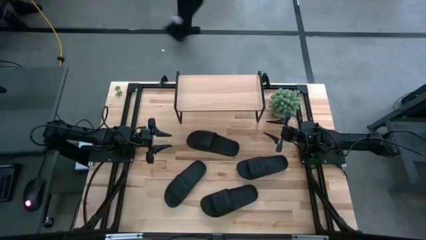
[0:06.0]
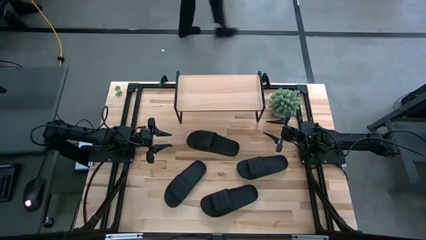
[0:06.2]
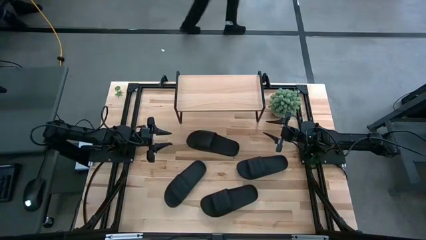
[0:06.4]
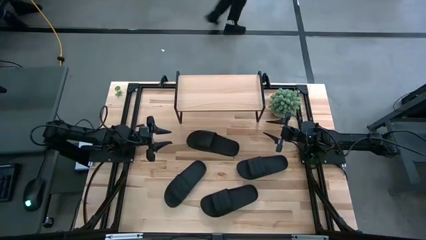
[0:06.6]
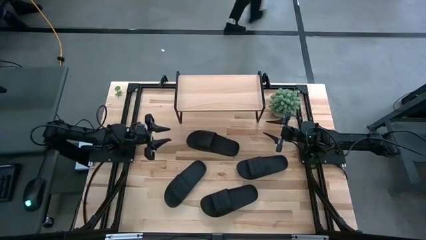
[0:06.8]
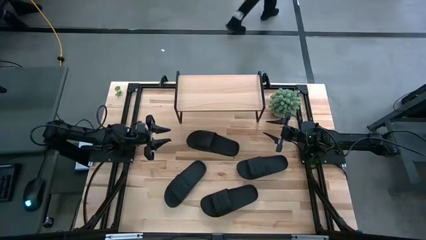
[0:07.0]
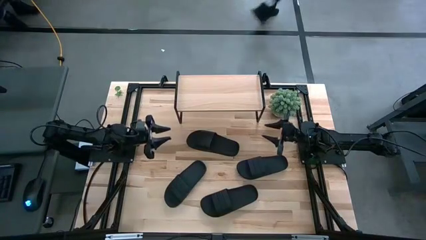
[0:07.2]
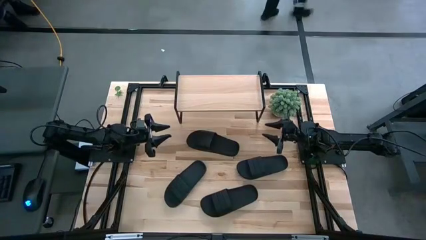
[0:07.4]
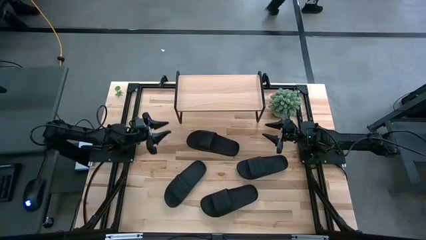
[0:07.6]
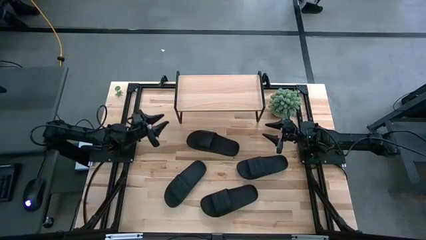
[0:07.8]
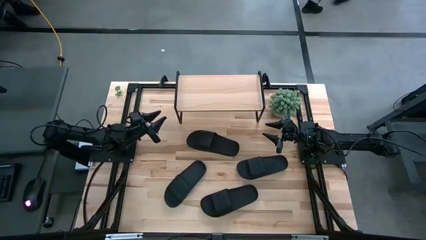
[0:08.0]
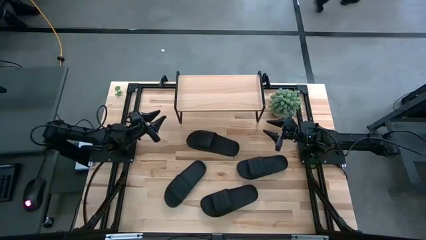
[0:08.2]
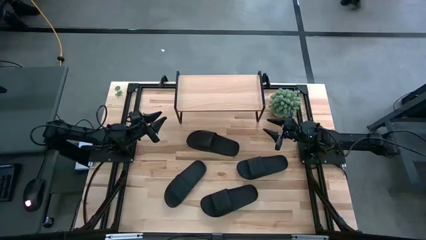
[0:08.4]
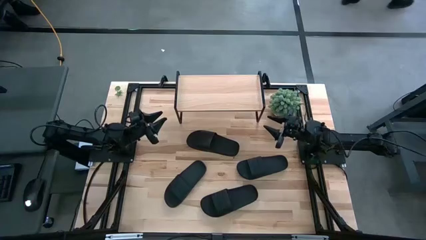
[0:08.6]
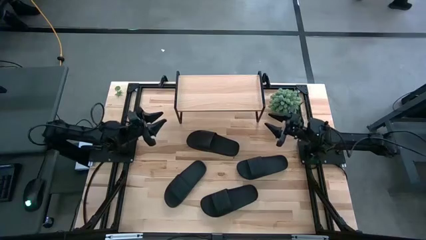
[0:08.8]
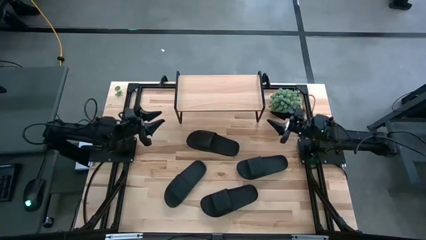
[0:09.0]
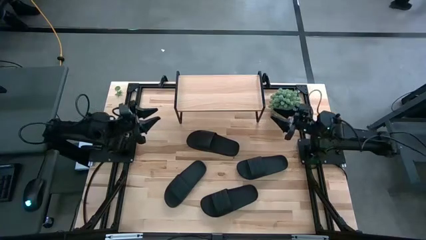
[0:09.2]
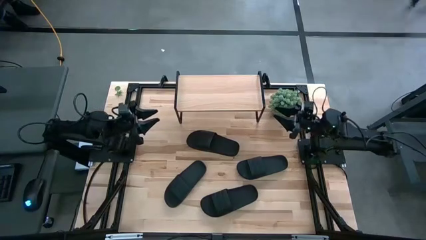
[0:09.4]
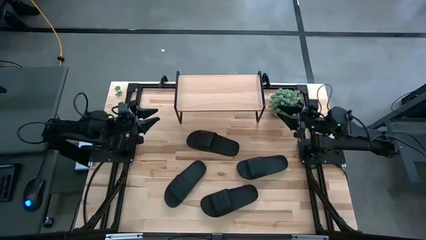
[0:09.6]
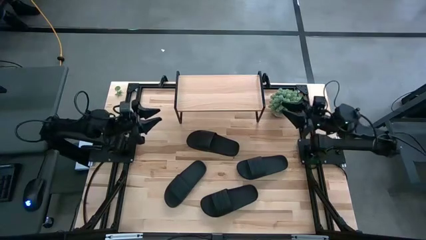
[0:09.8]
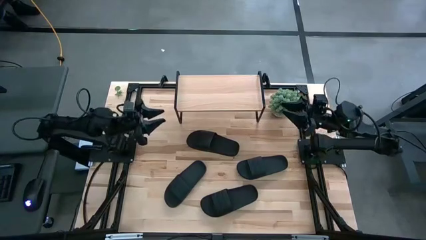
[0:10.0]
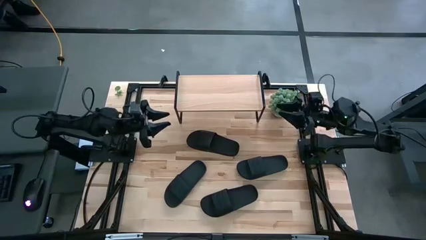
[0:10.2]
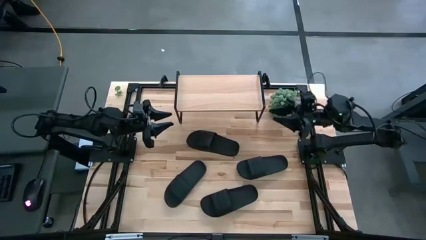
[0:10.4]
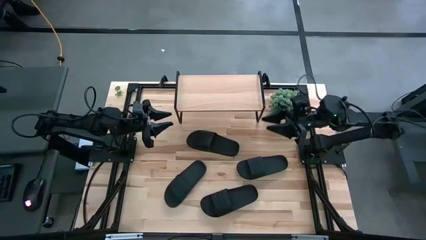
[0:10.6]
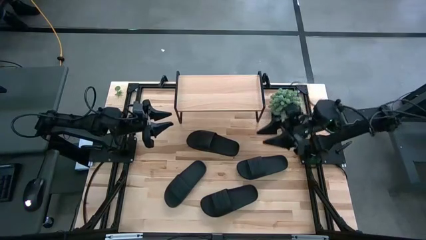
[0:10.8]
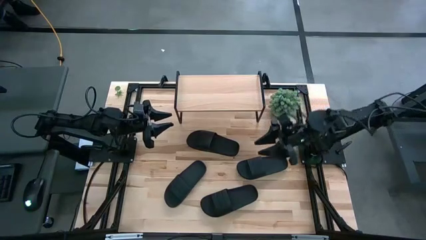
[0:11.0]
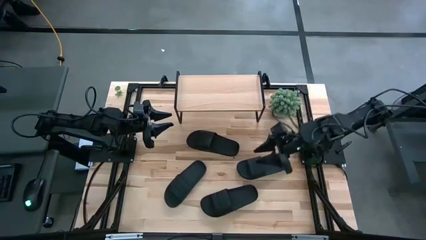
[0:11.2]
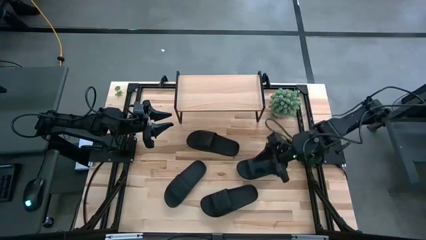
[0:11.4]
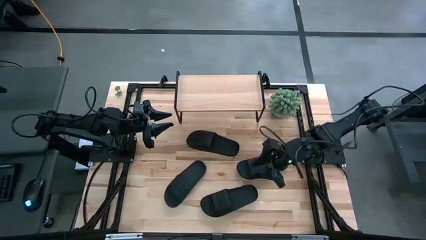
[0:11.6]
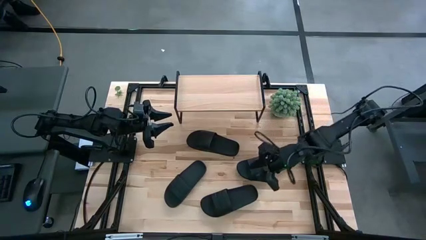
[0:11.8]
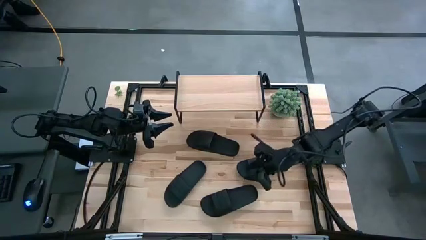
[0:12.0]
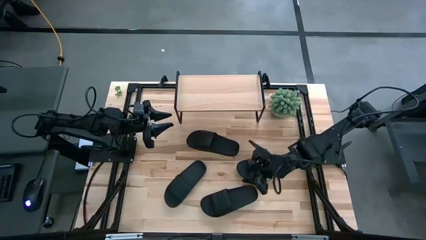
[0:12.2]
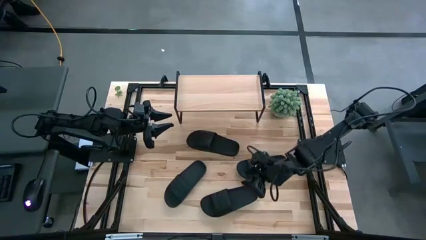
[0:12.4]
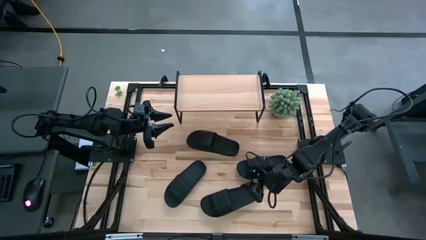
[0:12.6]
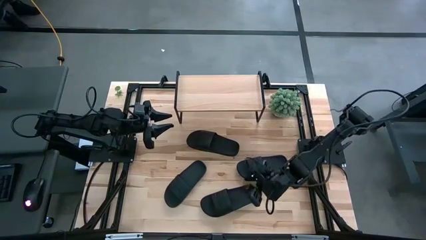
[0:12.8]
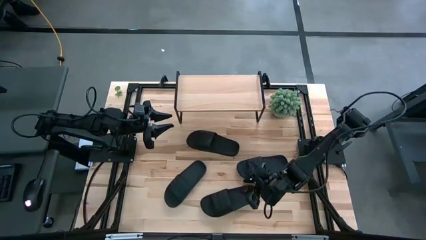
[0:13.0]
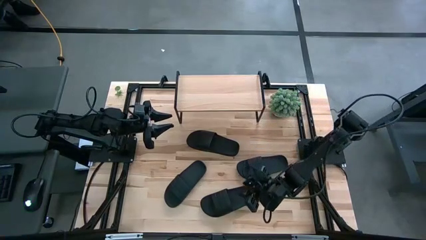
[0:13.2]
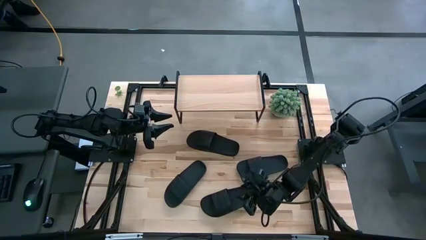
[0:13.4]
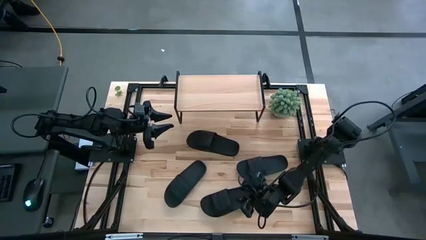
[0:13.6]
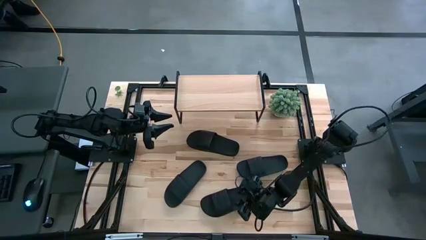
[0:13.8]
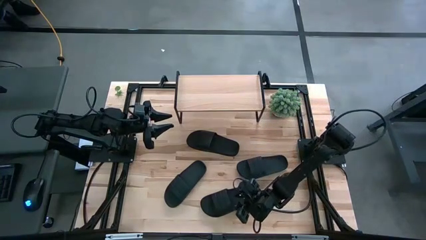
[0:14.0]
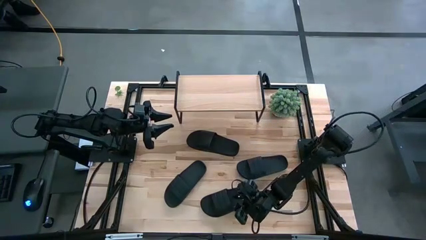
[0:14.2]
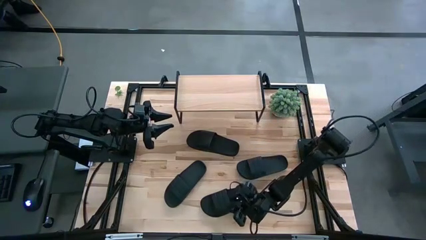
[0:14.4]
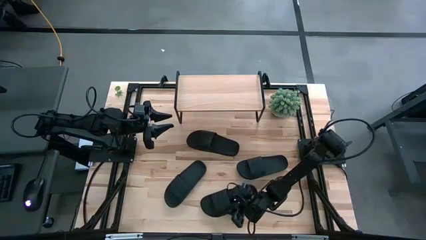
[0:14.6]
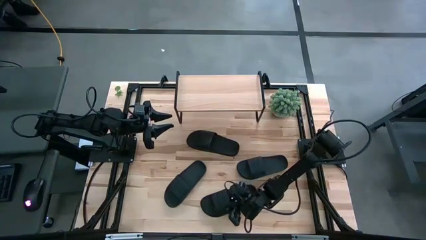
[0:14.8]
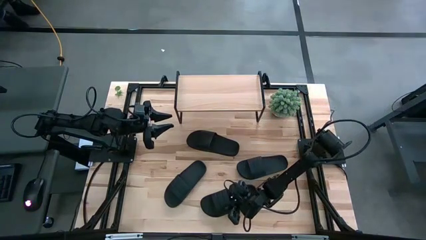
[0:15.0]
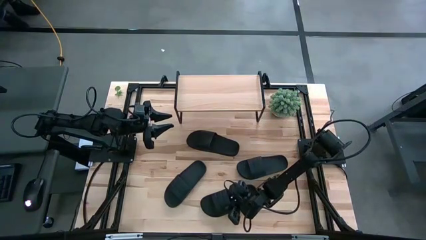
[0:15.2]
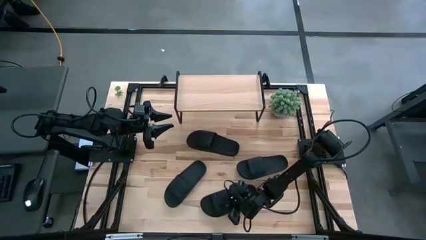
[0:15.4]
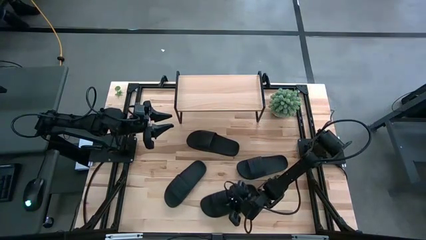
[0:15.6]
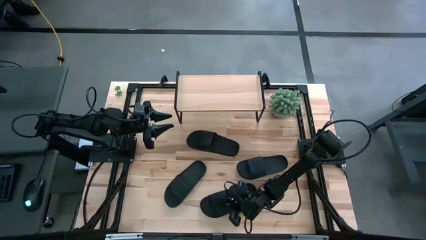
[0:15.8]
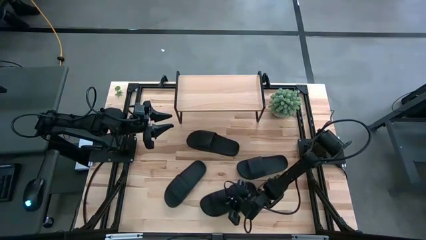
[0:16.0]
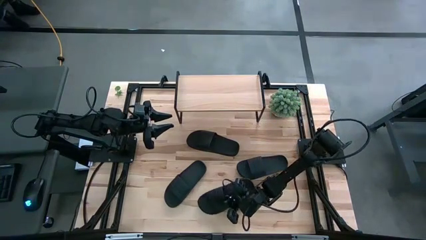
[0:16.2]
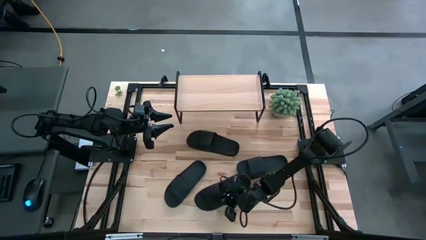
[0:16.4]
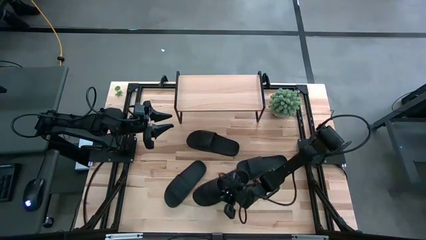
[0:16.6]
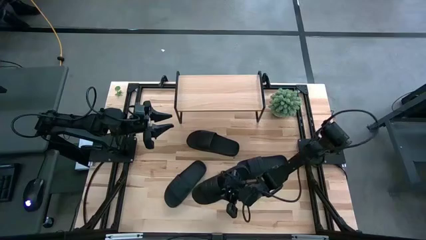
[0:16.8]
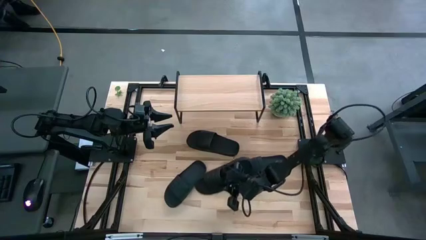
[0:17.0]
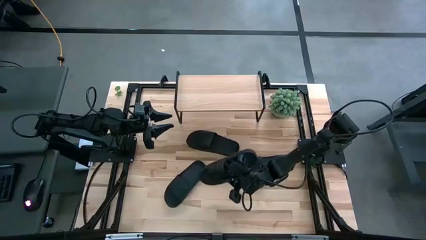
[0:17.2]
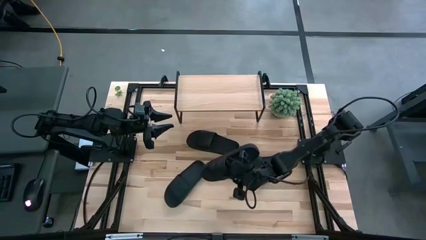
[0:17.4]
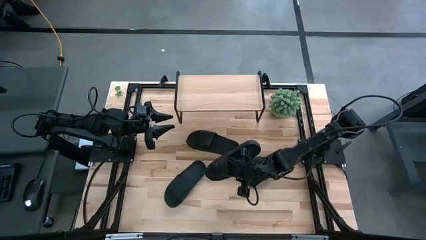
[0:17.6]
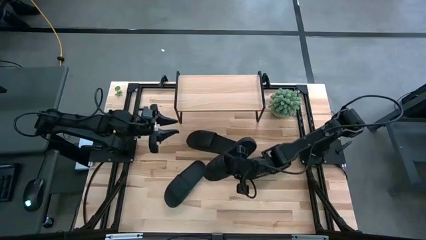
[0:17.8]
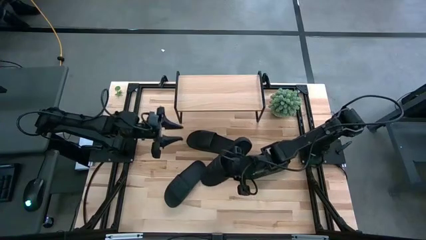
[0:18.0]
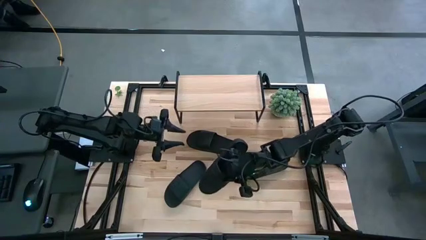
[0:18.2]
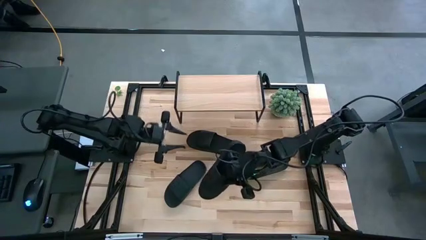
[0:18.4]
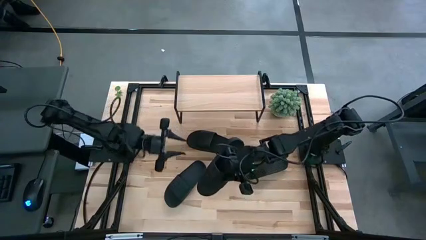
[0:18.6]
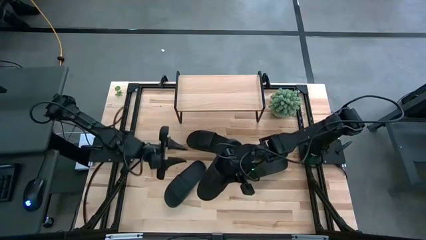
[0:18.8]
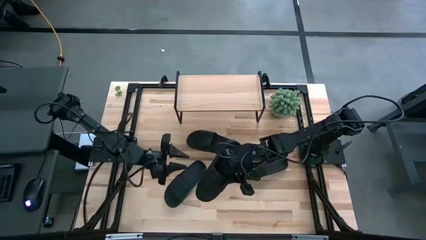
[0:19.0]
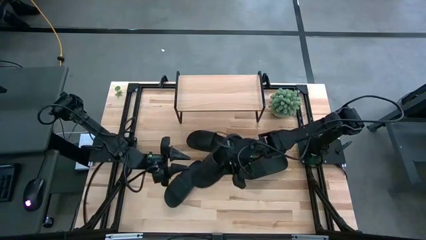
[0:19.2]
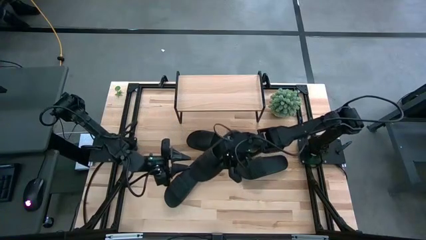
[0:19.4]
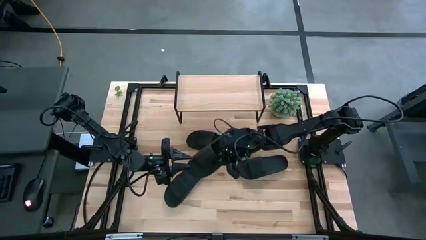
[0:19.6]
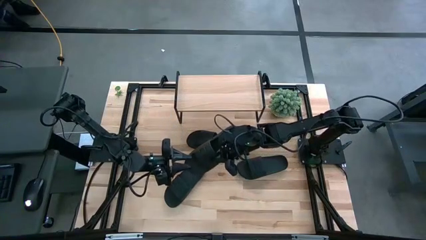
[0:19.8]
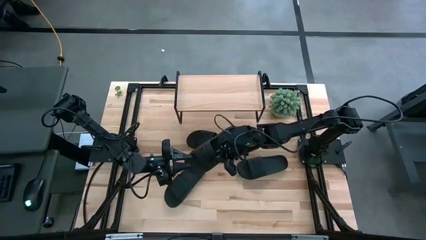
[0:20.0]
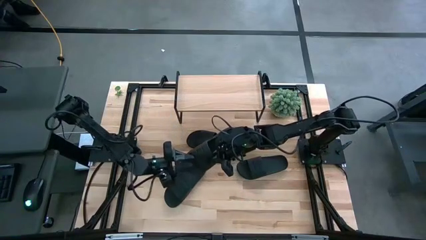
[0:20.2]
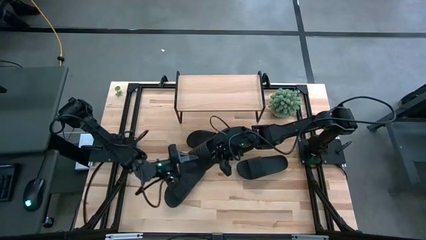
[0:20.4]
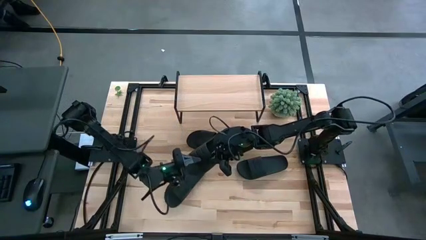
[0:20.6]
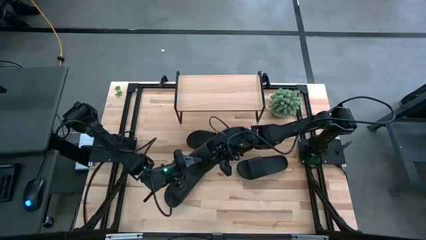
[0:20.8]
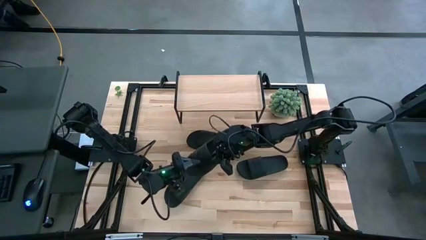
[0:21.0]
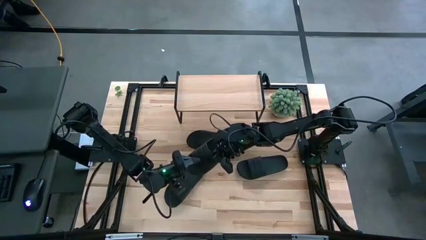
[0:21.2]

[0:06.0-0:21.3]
Task: Pick and place slides into the shelf
Put the black slipper on the shelf
